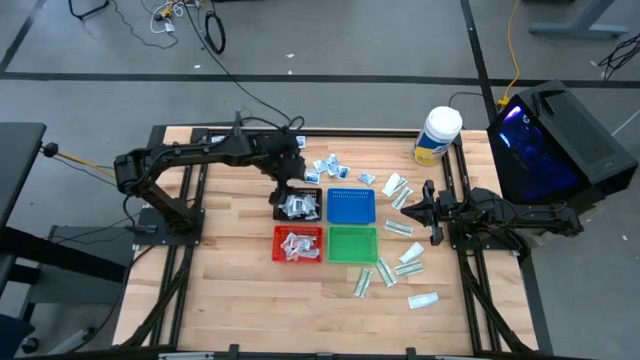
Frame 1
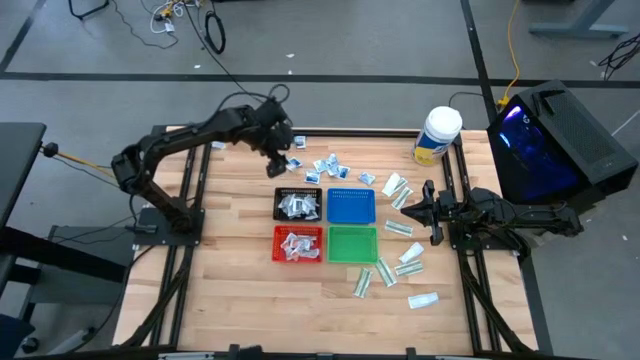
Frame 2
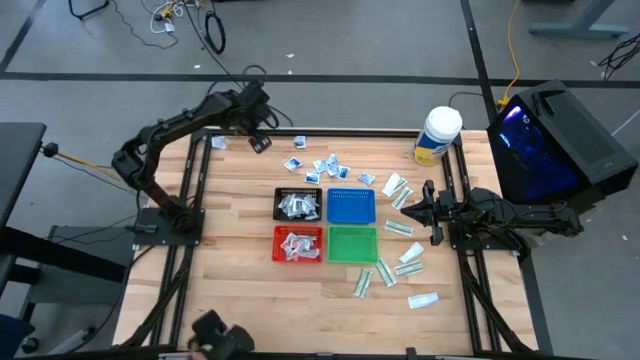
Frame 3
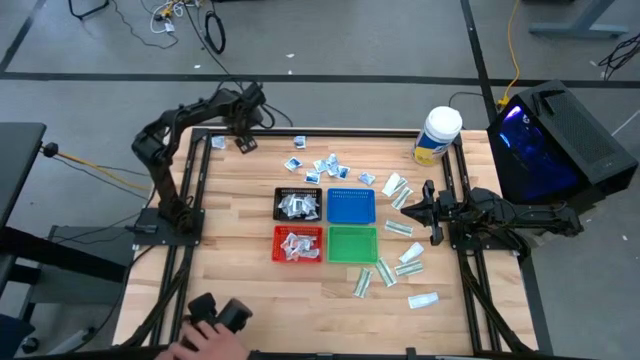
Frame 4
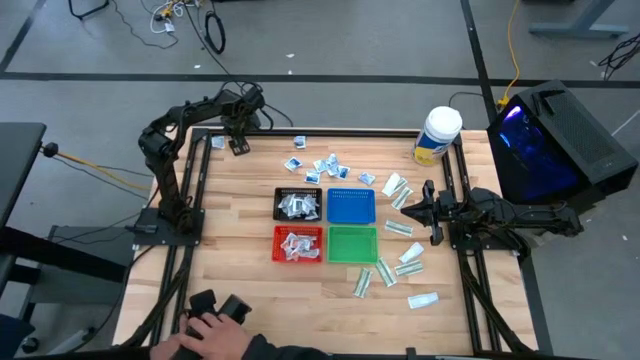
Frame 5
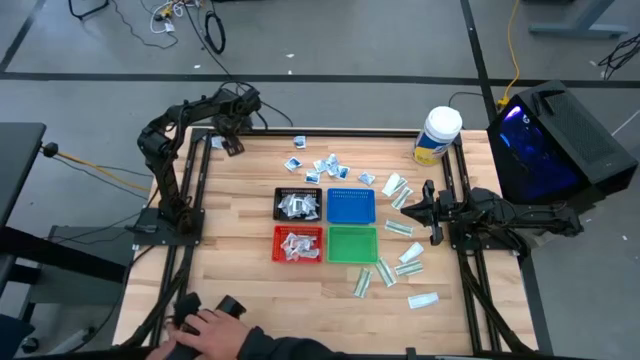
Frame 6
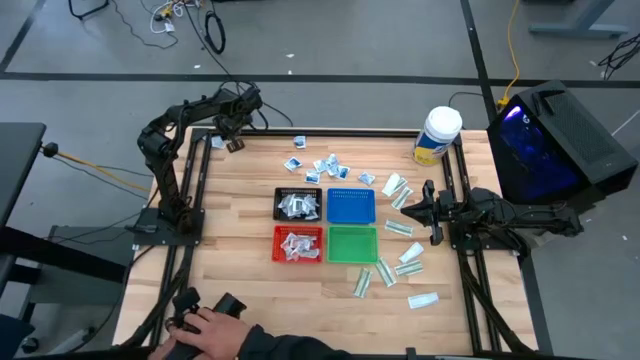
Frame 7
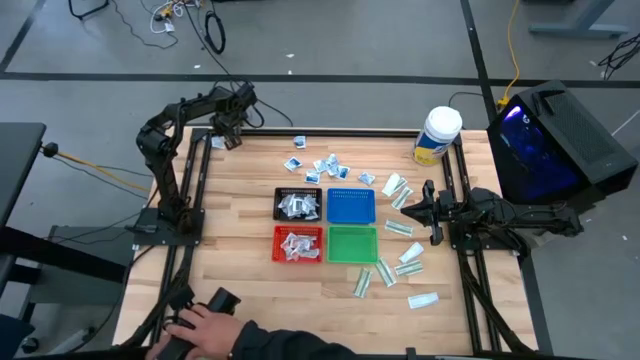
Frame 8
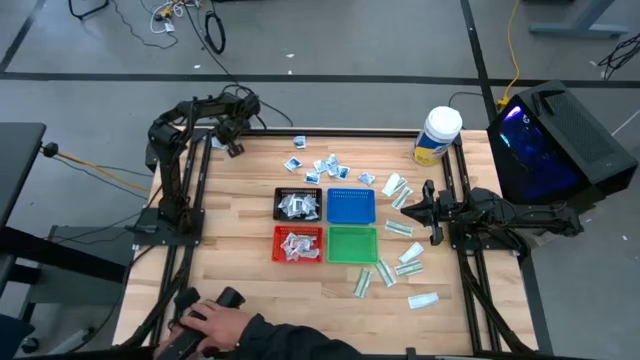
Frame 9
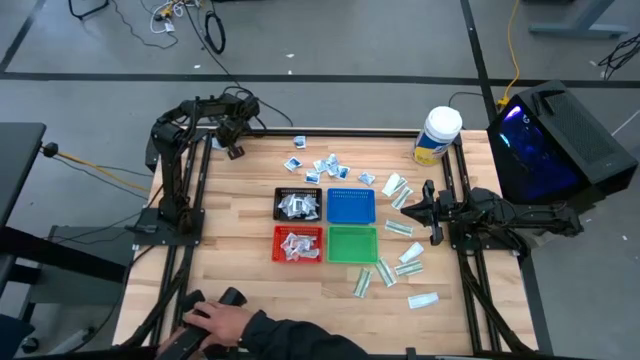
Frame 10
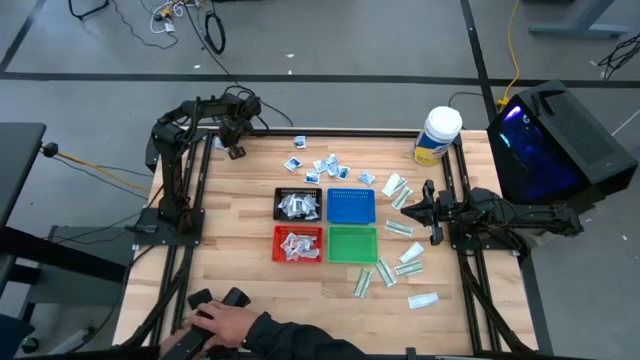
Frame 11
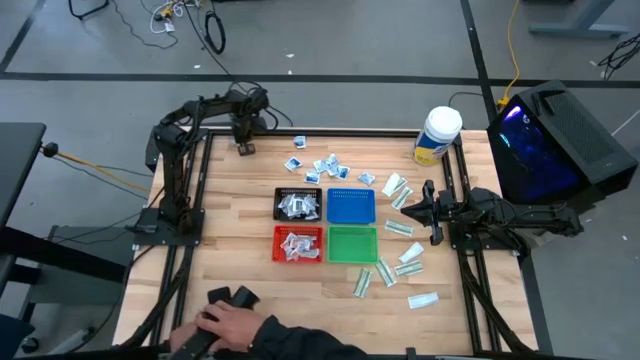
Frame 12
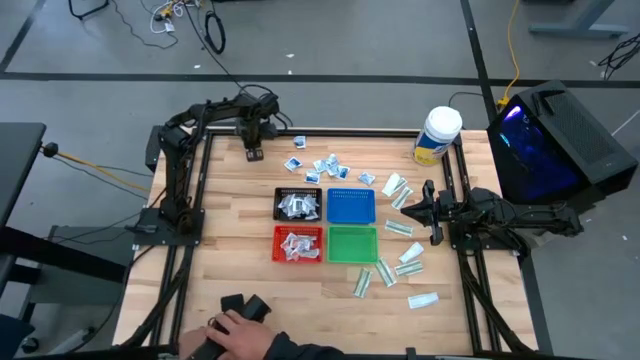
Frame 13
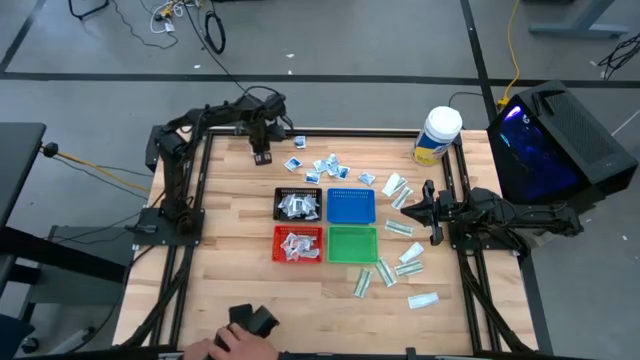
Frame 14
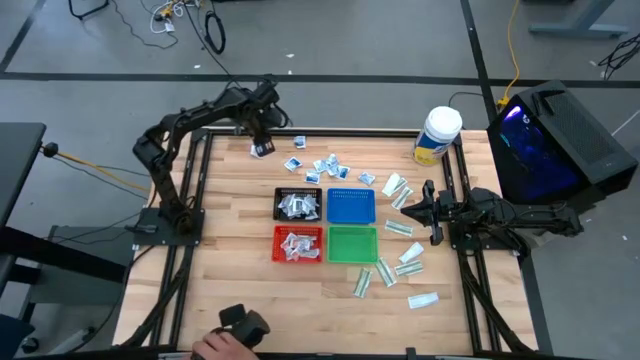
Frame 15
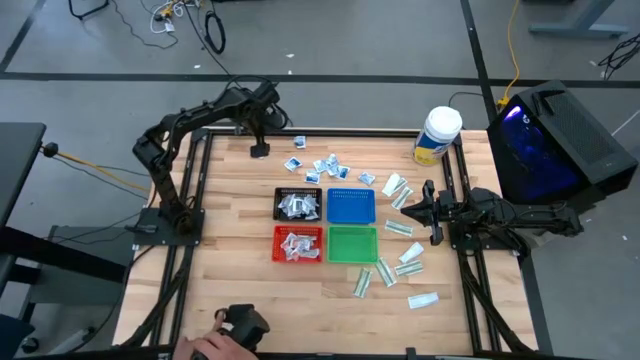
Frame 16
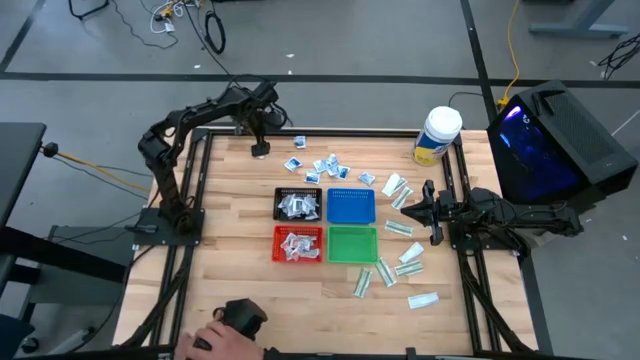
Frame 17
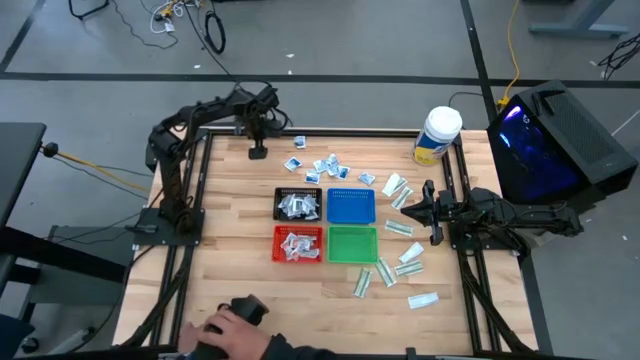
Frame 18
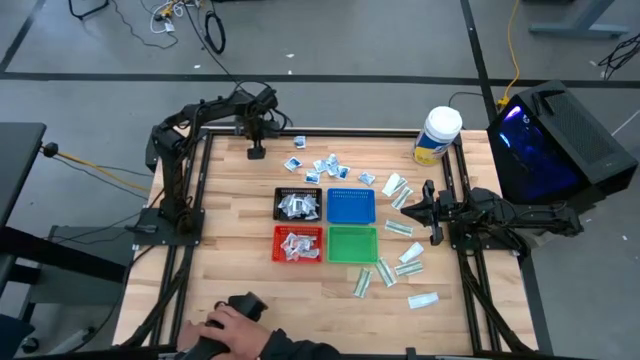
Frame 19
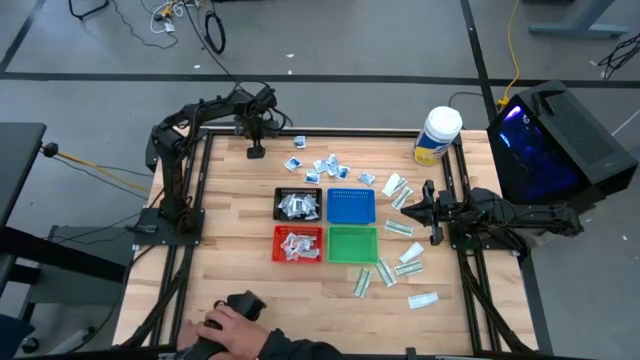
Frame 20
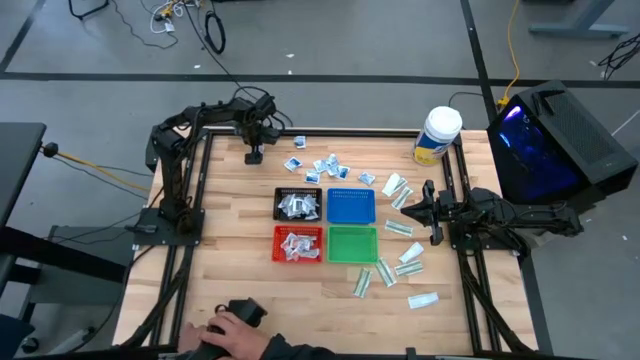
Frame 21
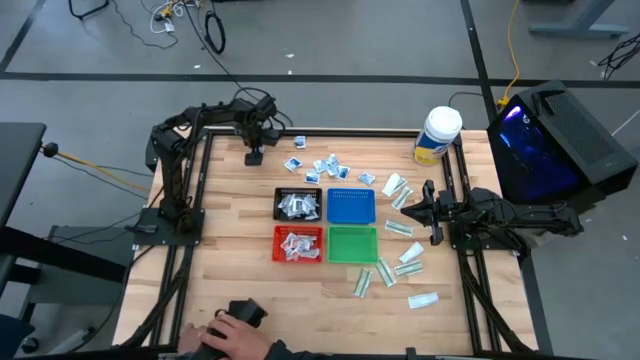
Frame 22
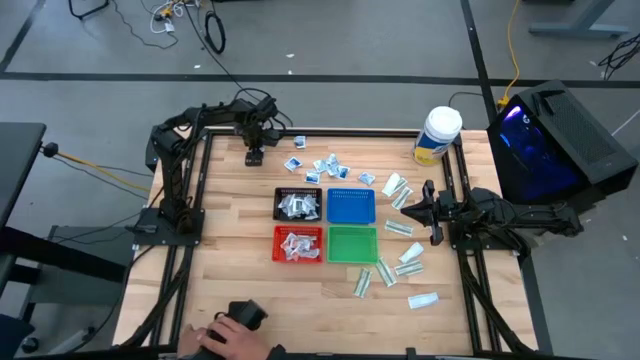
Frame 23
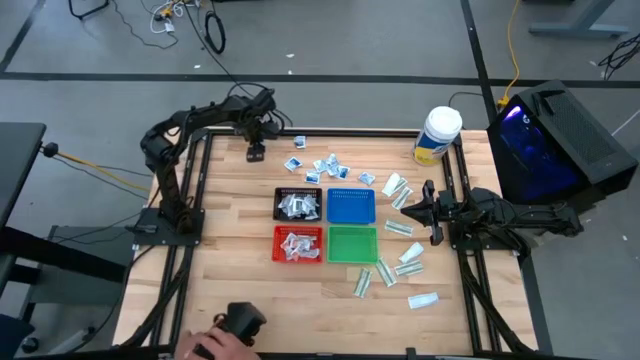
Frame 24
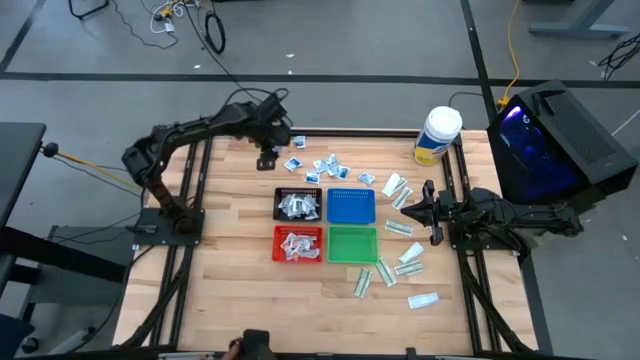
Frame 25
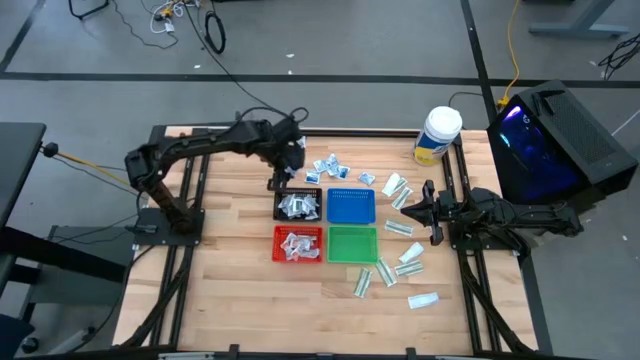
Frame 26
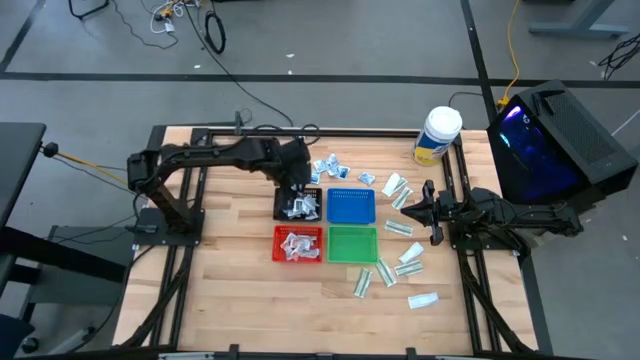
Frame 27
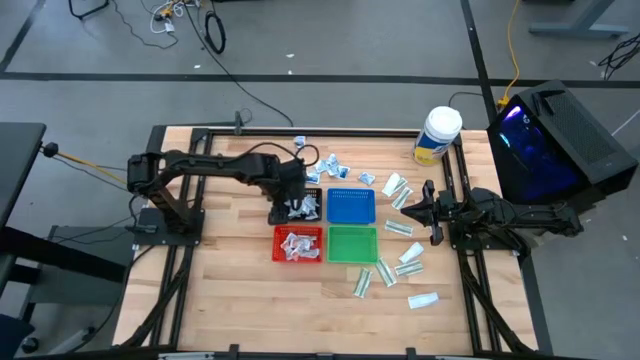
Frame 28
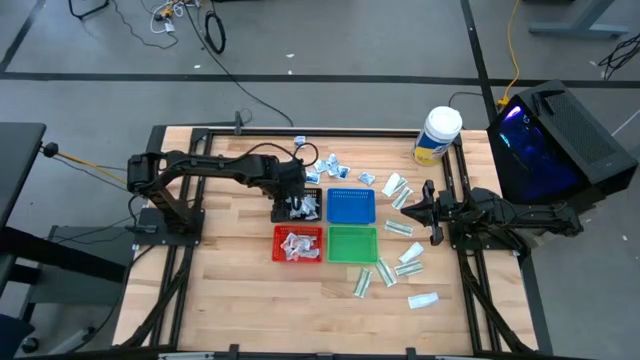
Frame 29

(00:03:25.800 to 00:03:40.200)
Task: Pick & Place First Aid Supplies
Put the gray towelette pack into the black bin

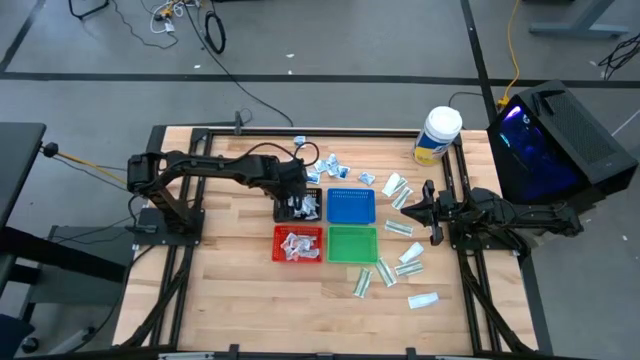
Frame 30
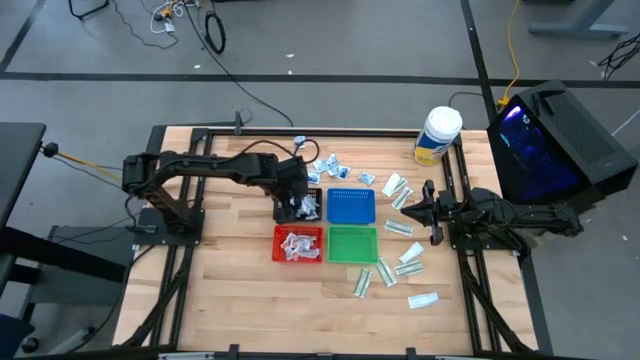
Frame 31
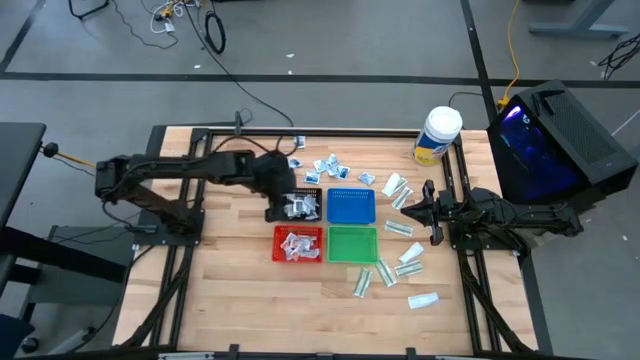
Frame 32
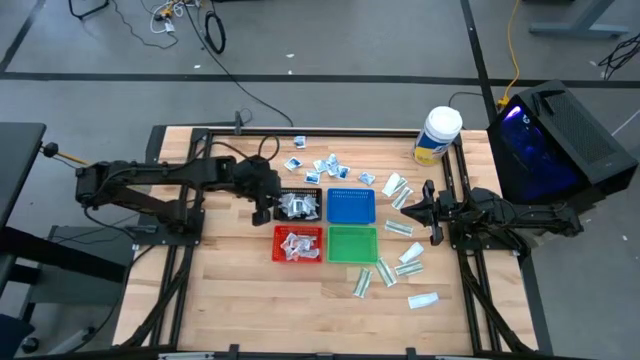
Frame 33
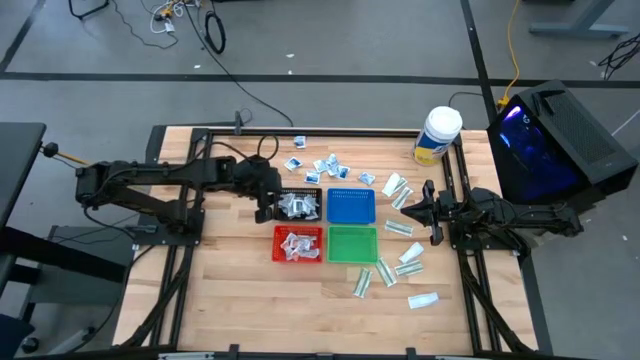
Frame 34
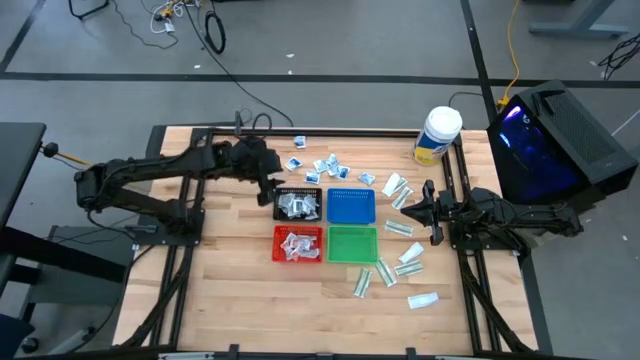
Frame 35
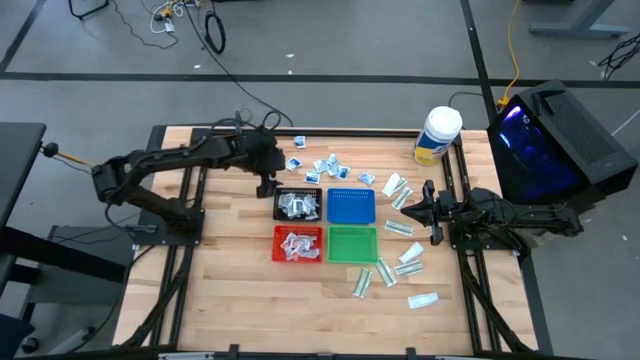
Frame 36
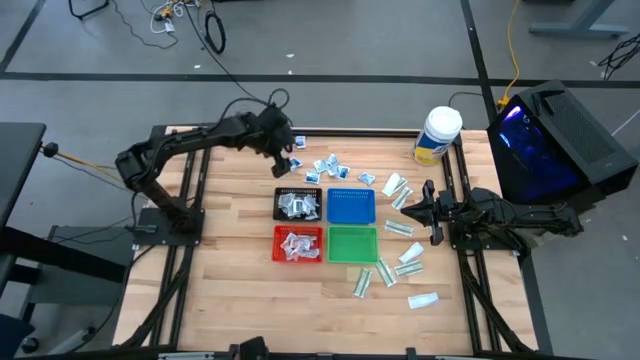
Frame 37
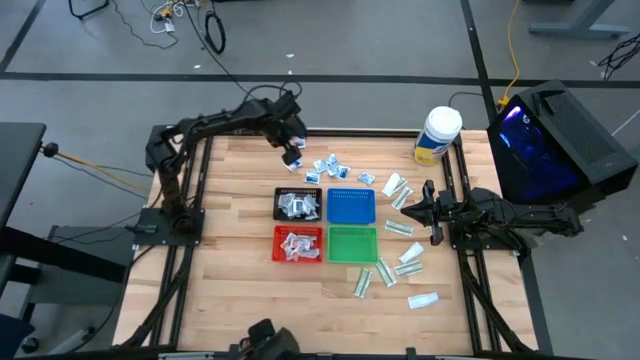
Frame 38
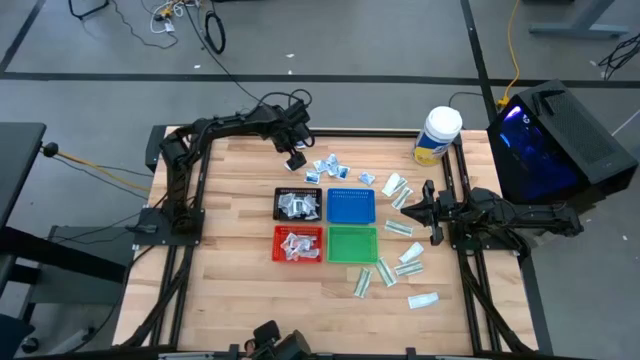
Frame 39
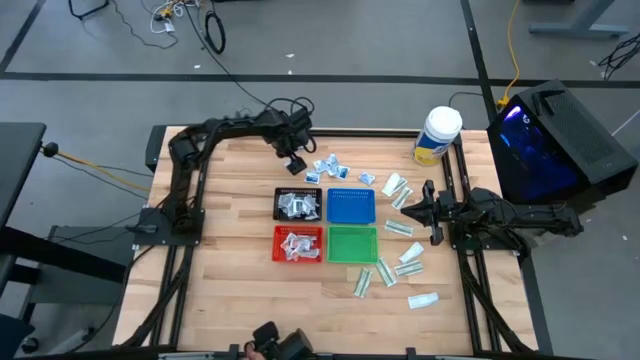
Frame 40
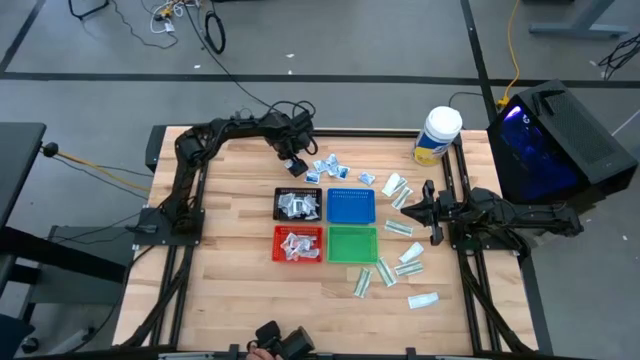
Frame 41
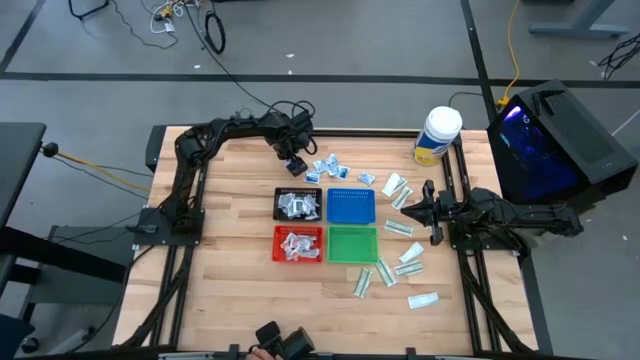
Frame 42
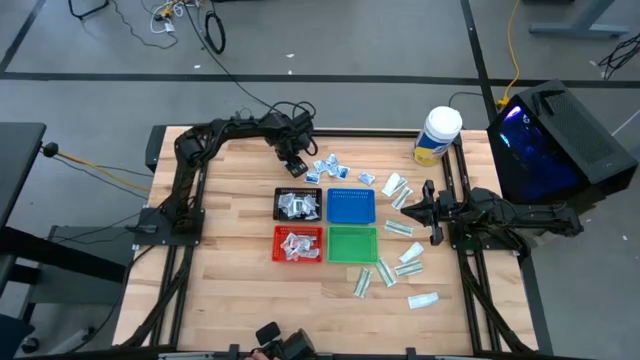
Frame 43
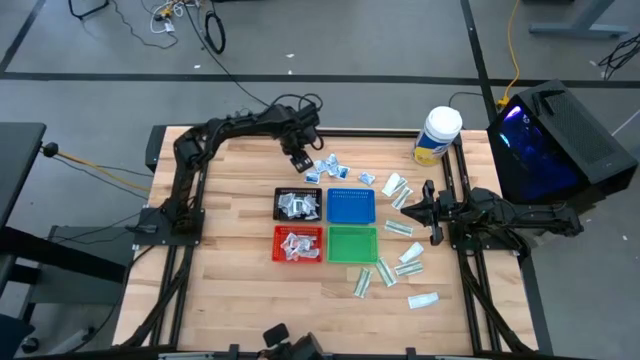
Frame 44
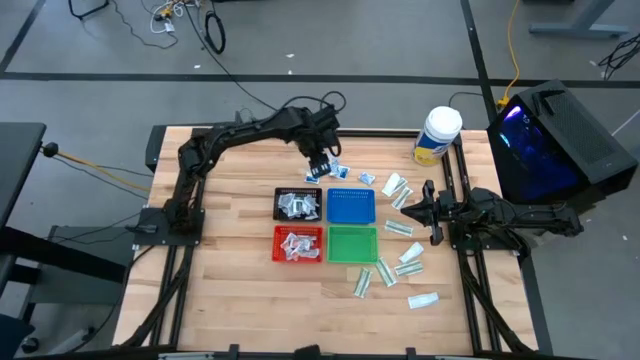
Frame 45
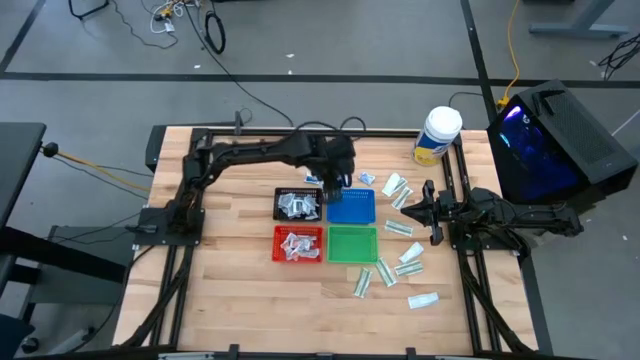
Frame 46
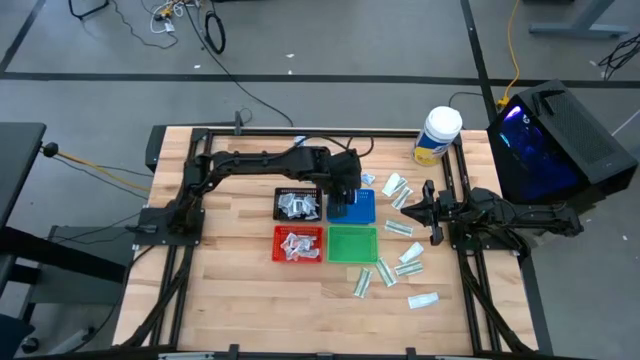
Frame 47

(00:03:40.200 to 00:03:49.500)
Put the blue alcohol pad into the blue bin
